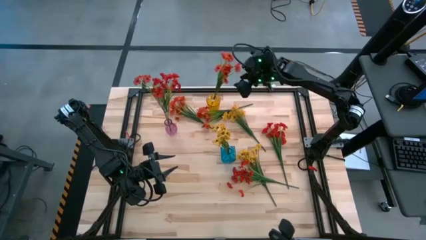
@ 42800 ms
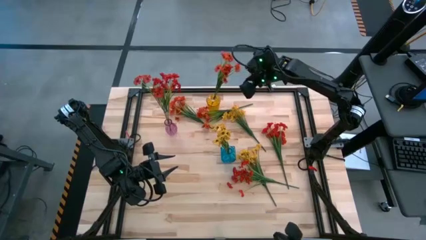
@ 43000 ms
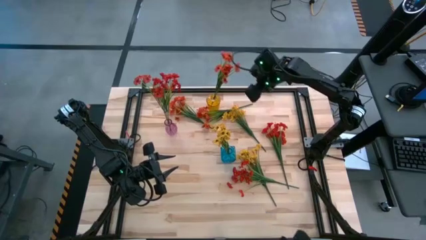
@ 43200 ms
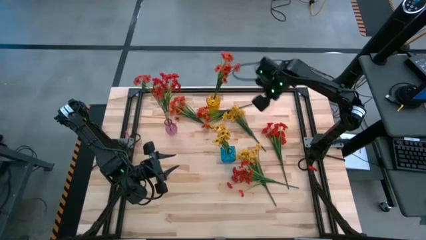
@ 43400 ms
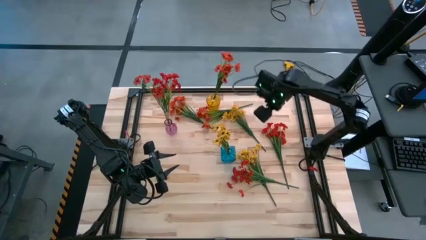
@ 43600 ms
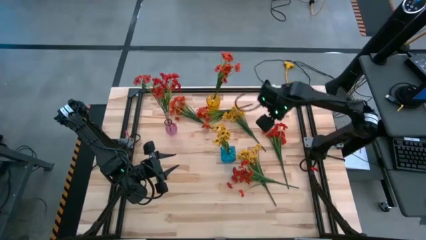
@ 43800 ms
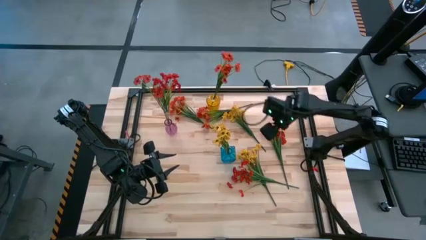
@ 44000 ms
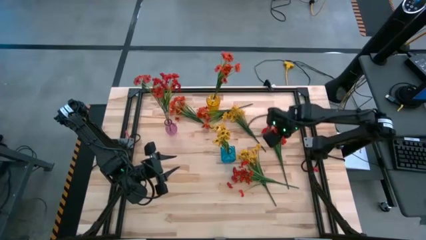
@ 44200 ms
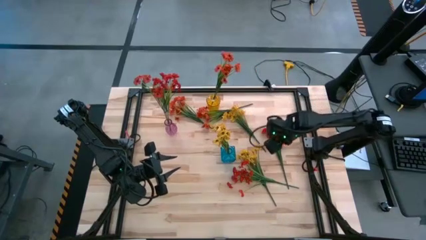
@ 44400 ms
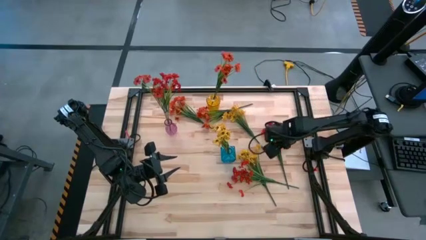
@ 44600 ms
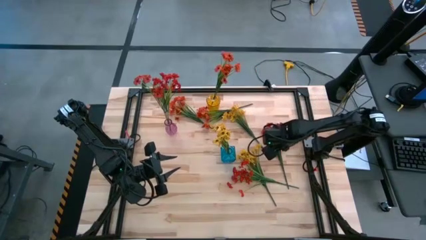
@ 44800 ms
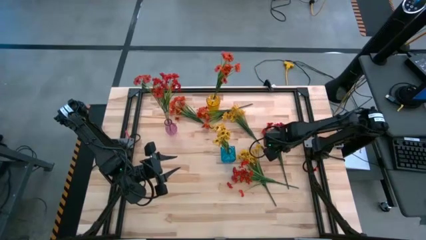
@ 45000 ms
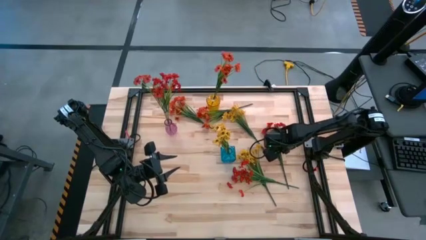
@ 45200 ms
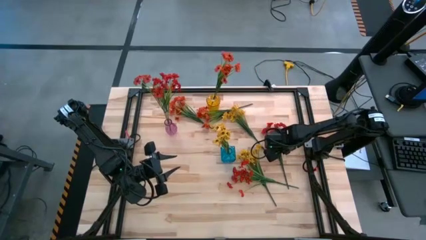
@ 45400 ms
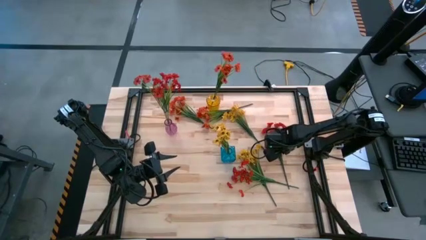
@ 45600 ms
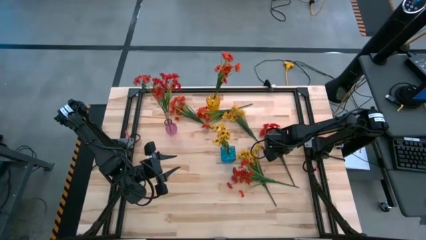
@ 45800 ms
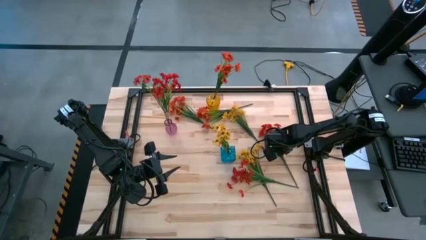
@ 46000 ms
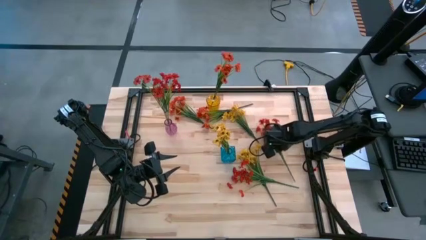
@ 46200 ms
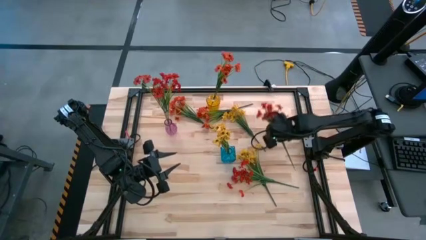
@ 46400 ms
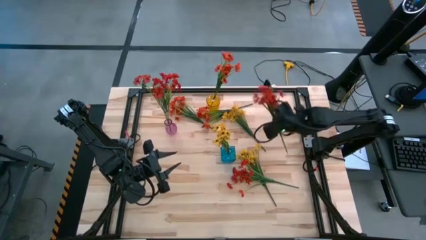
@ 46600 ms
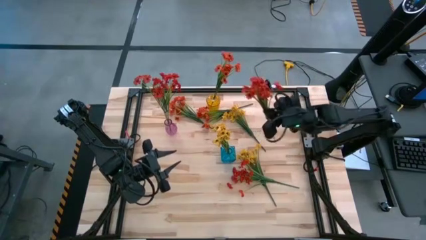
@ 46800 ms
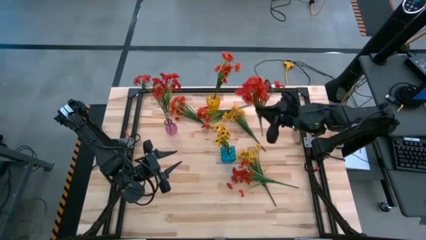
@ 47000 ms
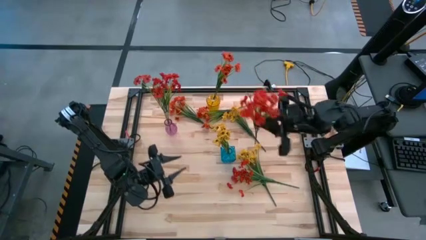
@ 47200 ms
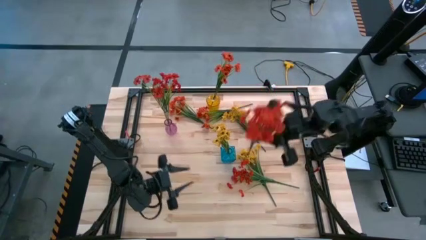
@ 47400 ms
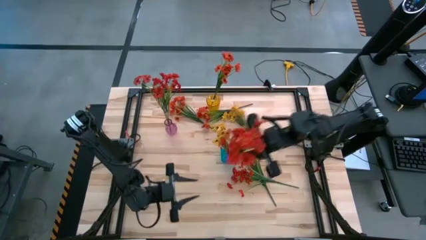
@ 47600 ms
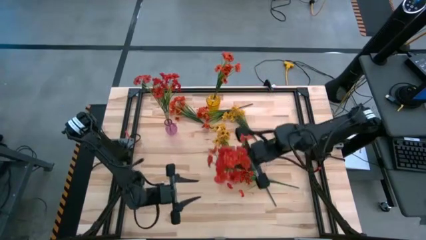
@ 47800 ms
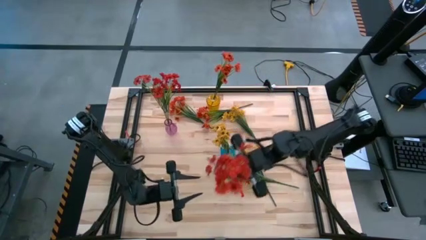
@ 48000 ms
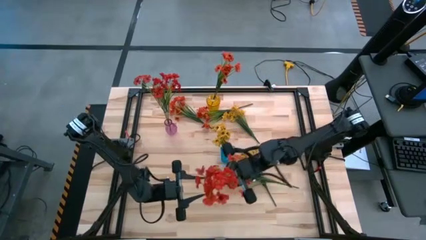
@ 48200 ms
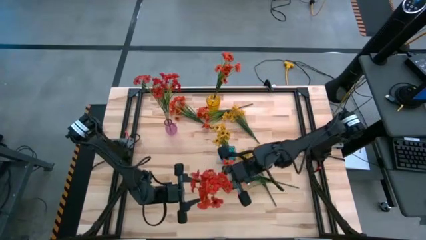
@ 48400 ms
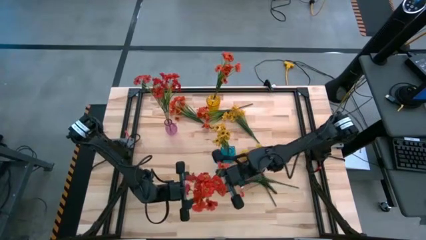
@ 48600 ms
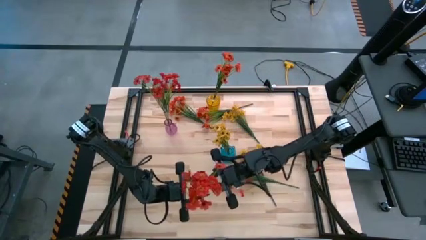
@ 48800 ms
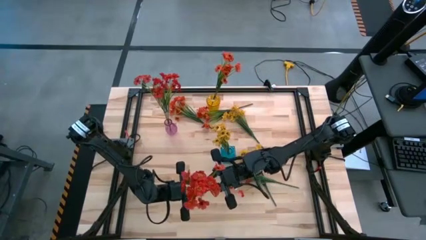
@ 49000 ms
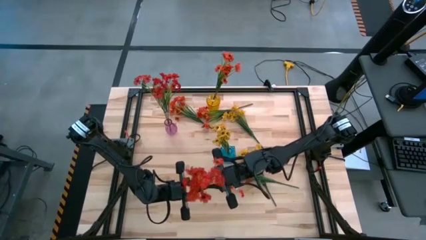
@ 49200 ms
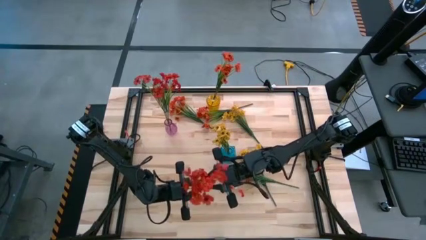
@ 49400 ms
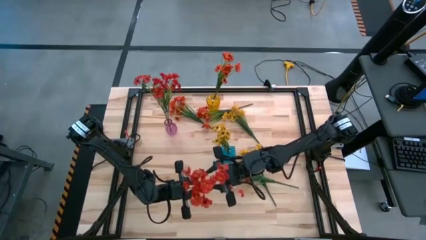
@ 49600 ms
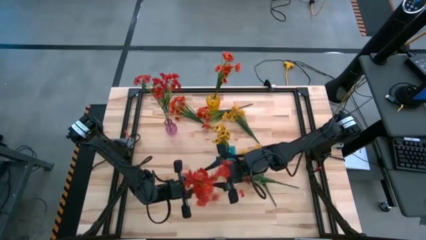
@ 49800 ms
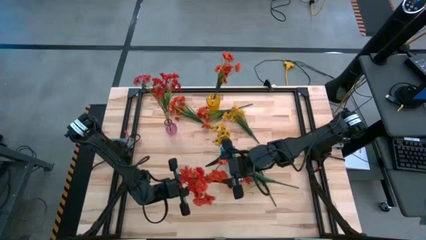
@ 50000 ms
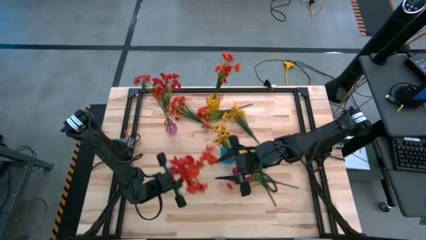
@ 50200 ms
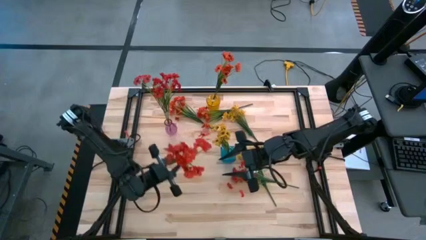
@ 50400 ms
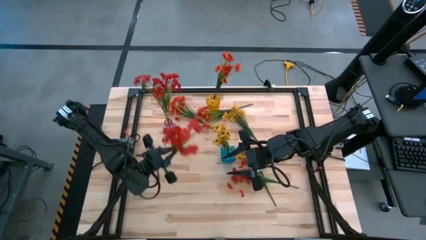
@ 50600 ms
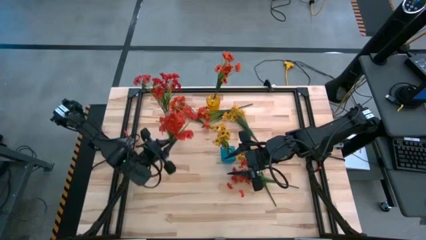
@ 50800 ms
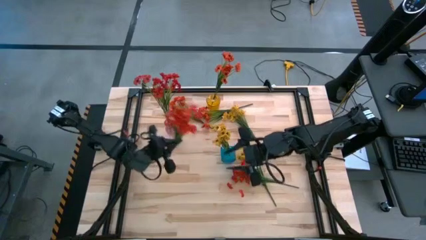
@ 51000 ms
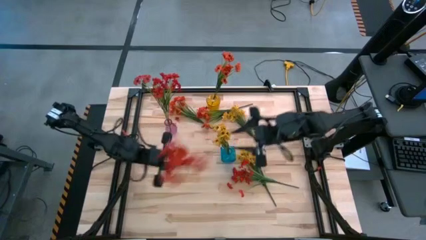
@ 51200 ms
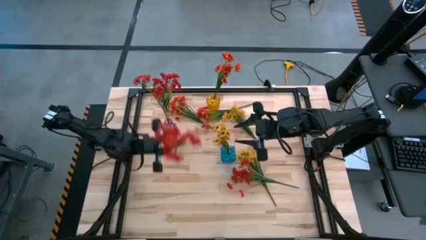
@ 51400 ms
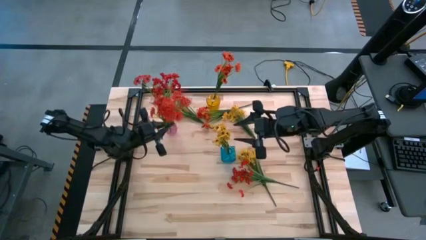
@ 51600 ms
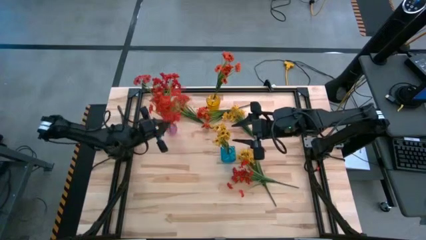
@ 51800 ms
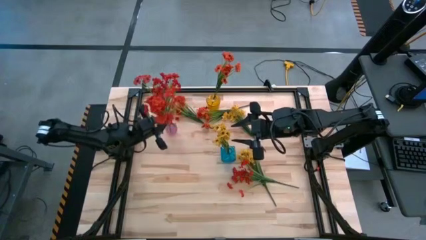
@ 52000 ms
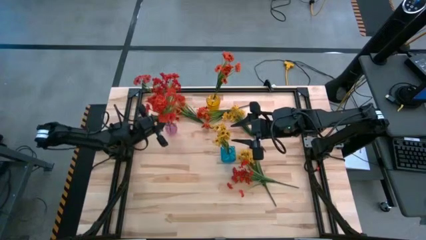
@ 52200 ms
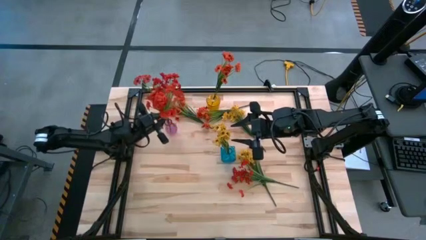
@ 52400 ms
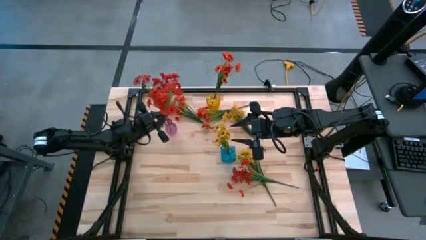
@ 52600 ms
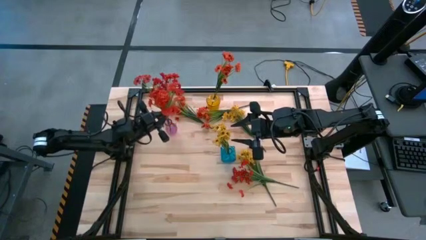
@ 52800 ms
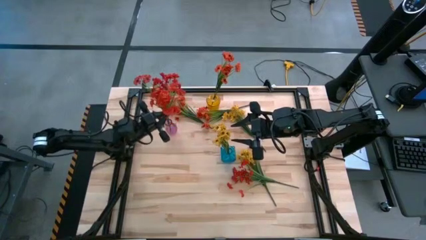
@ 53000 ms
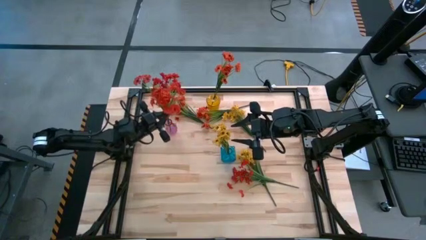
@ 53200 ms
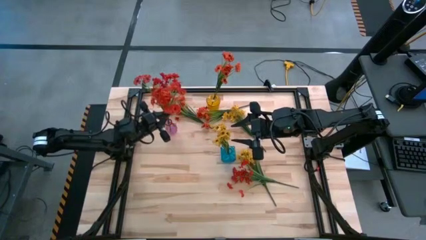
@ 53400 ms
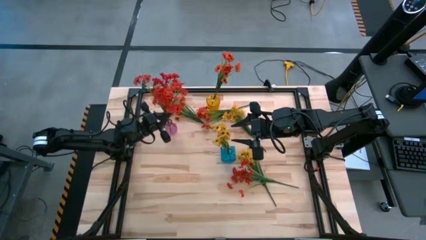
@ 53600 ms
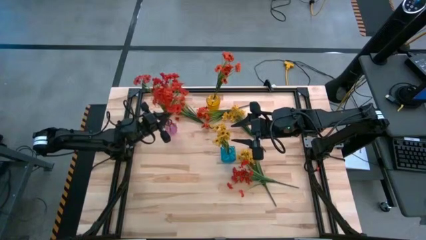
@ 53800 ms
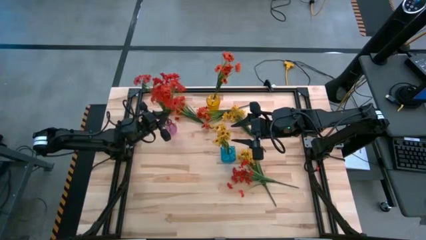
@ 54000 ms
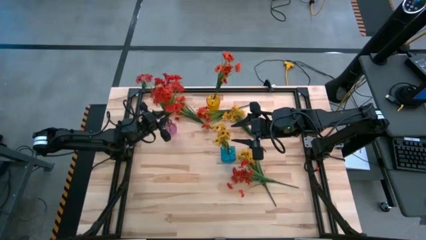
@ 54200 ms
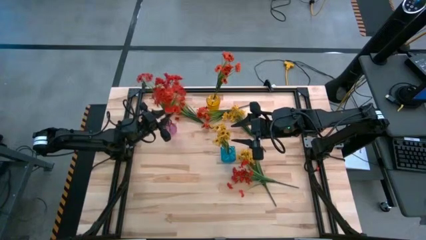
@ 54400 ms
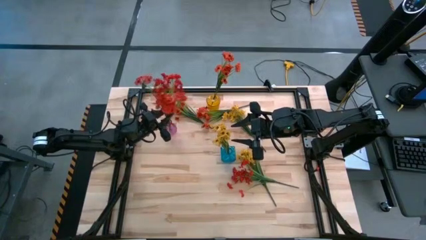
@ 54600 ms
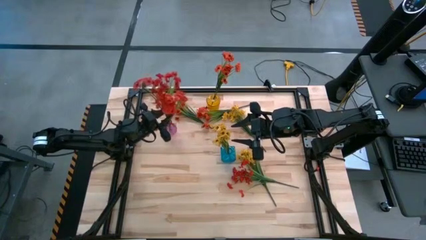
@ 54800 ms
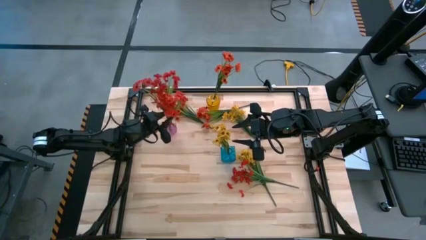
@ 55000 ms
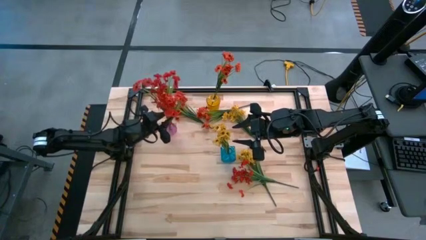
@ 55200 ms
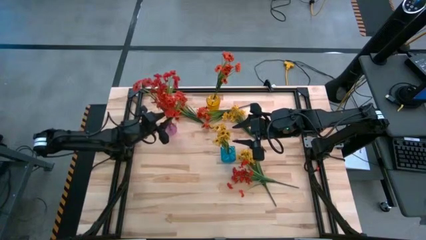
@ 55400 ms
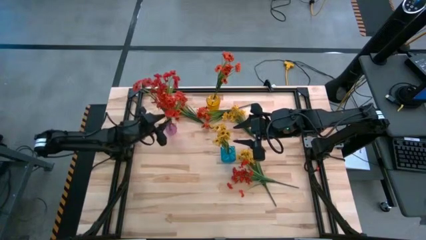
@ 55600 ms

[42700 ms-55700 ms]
Task: Sort flowers into vase by color
Put the top red flowers into the purple vase
